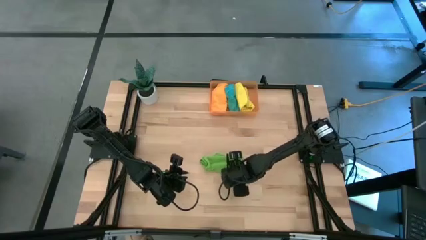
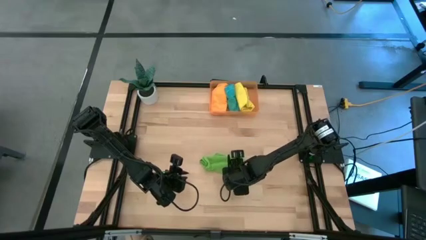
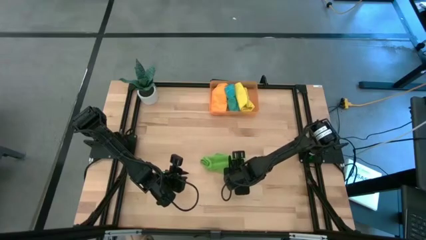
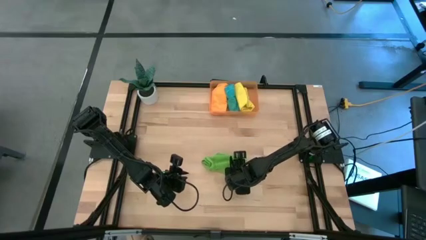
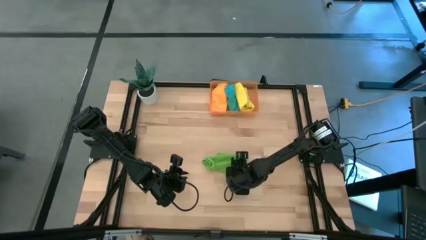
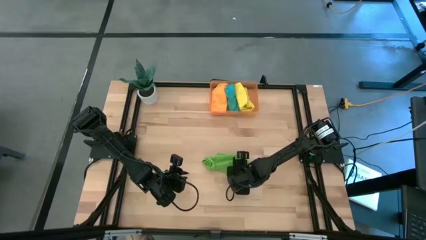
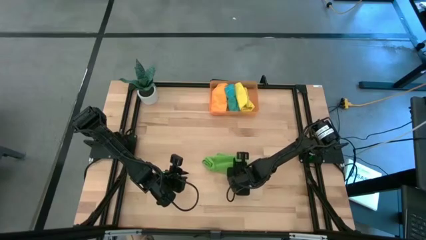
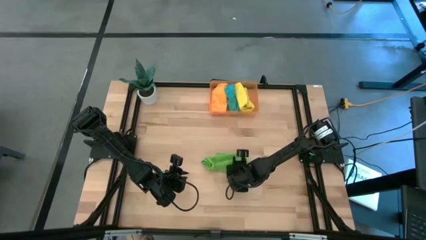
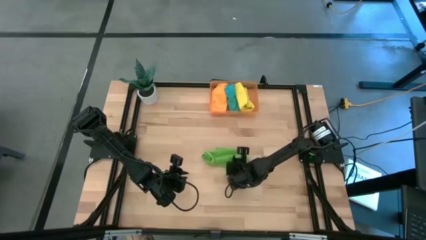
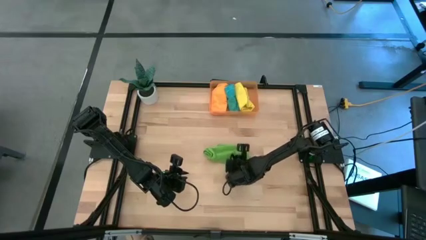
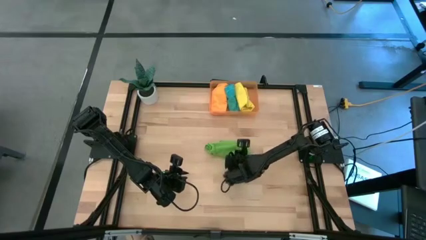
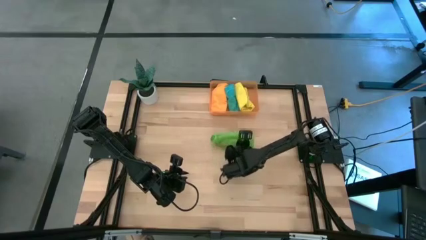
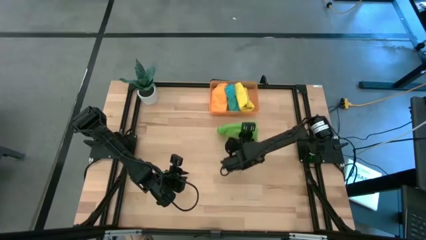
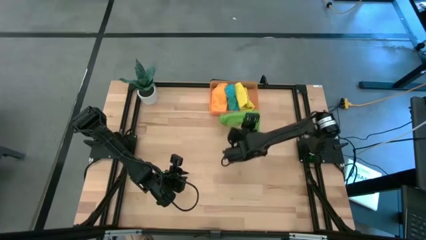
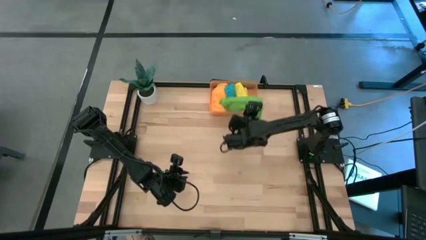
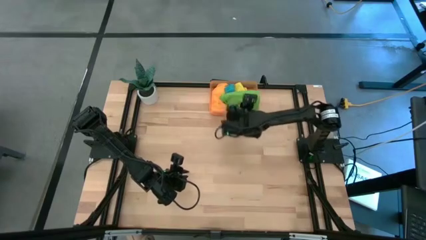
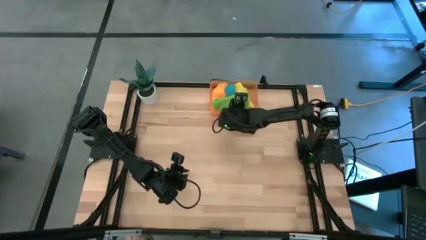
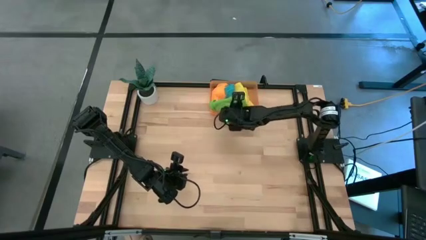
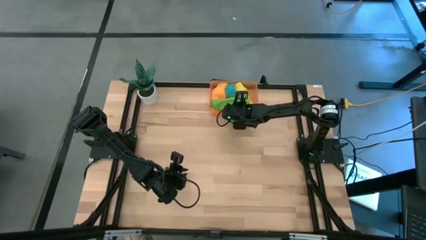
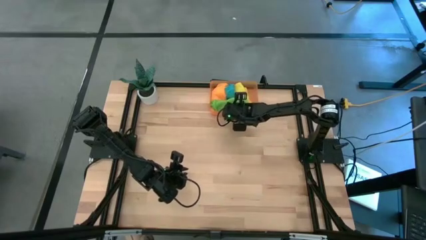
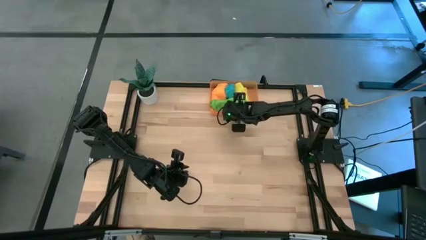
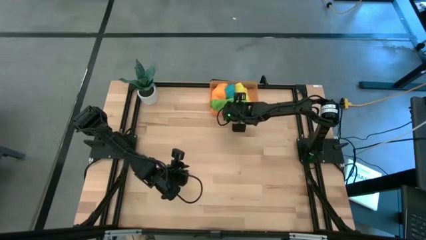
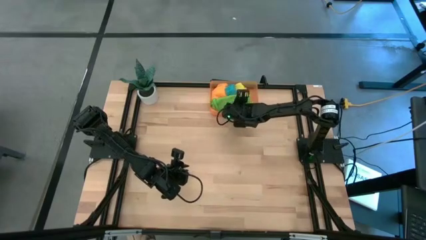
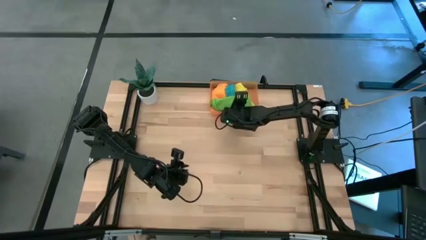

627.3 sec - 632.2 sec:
Task: Roll microfiber towels into tight, uniform cylinder then place into a basket
Put the green microfiber towel into the bin

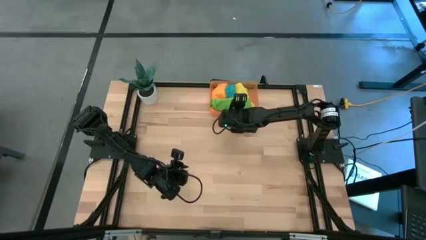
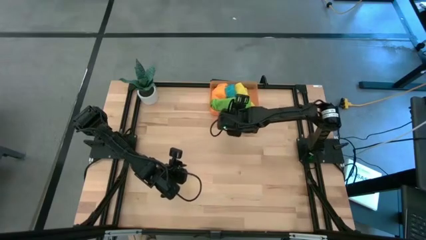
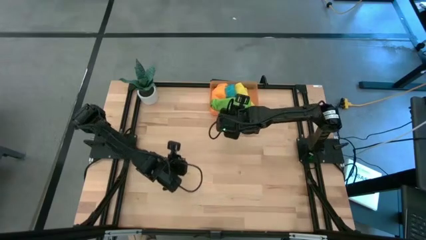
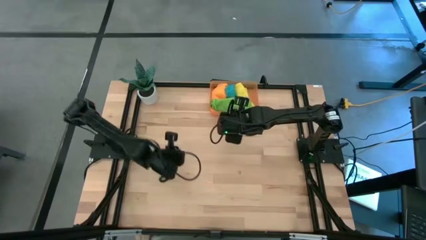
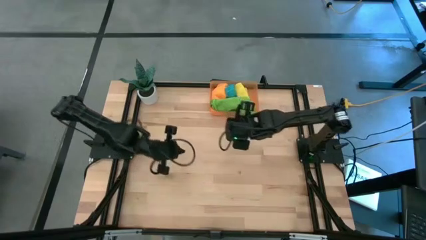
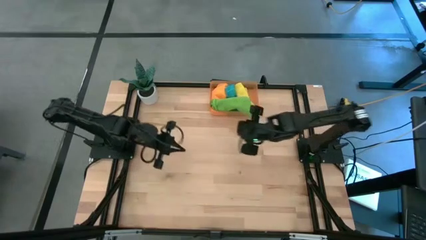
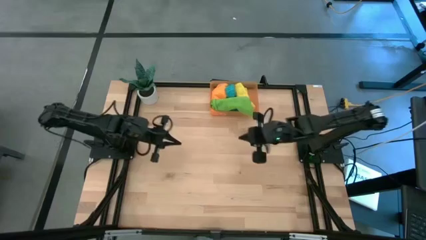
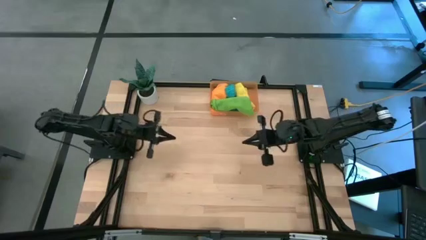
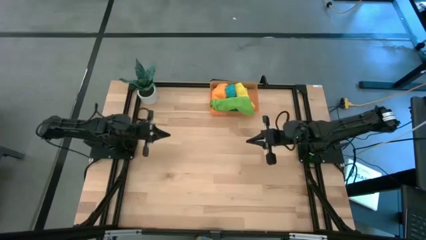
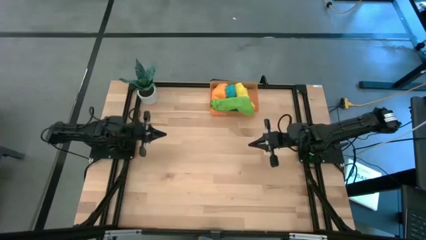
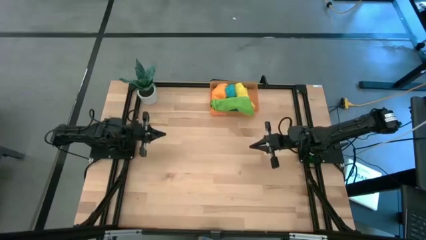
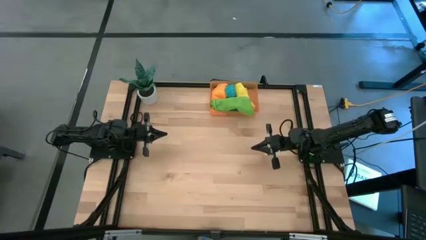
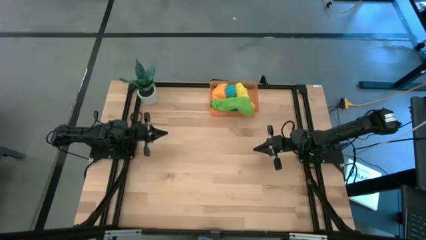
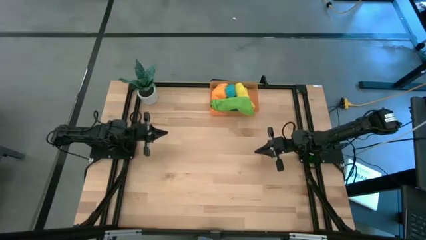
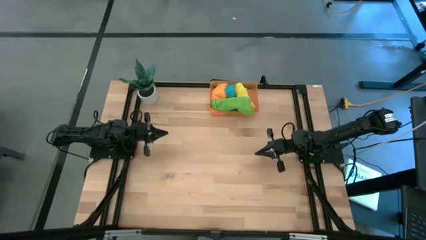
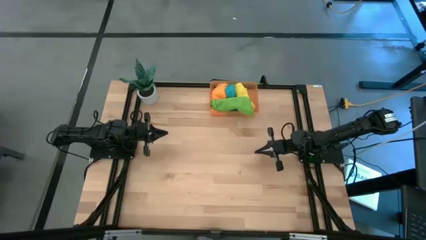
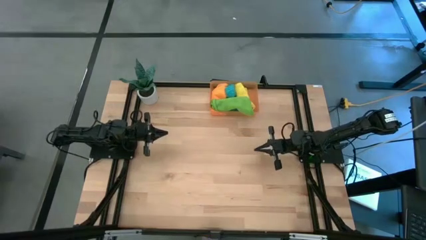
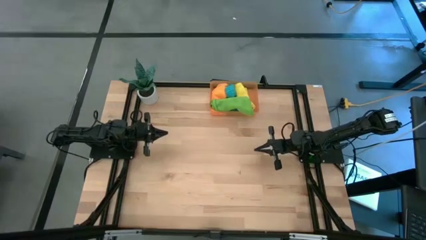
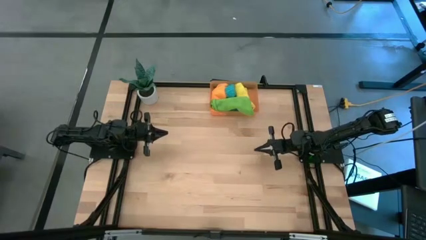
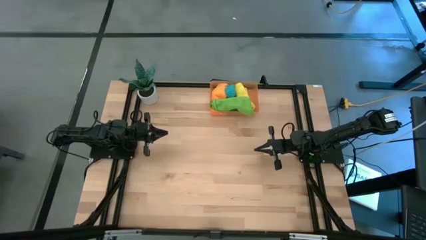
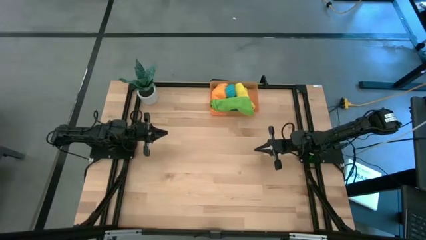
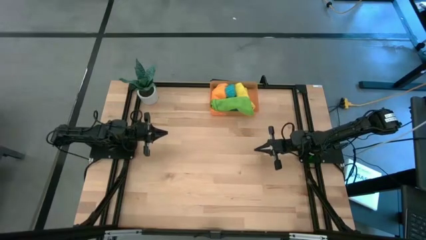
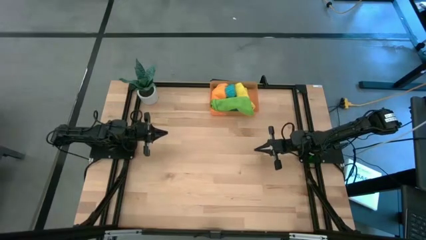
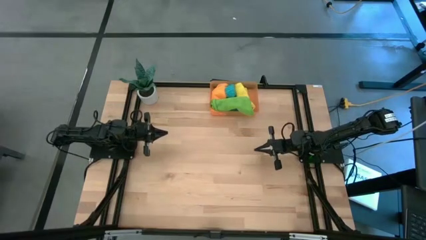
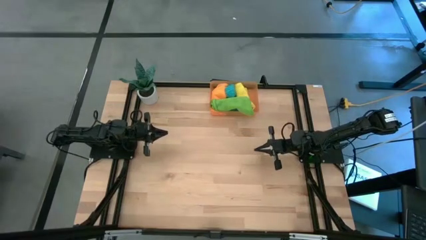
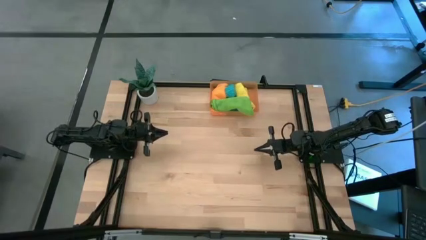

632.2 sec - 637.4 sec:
Return to home position

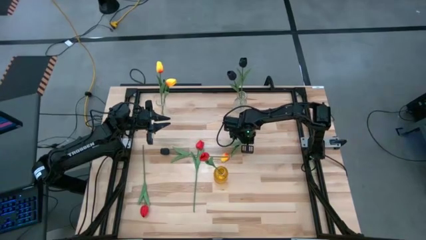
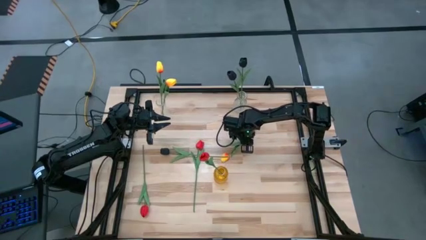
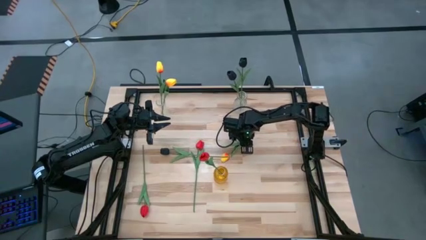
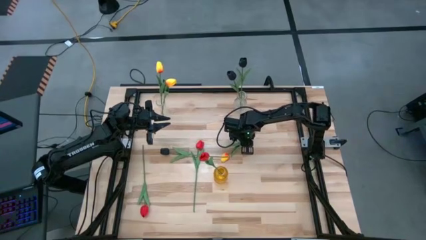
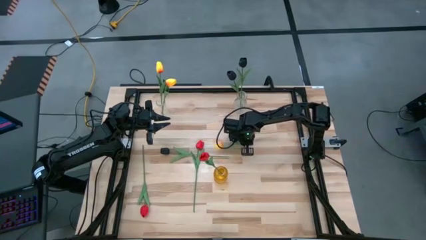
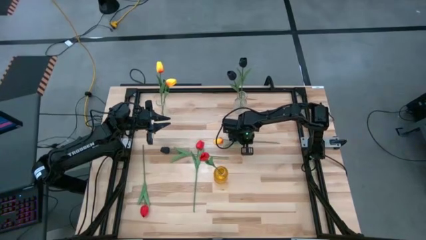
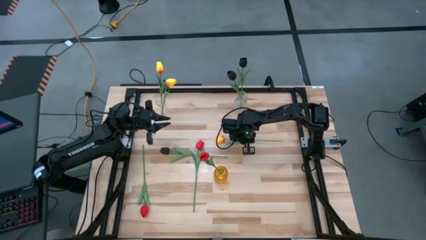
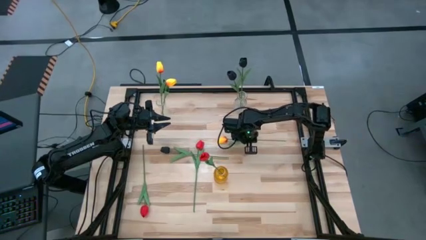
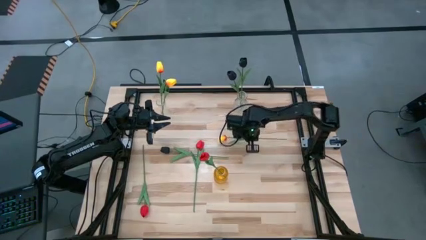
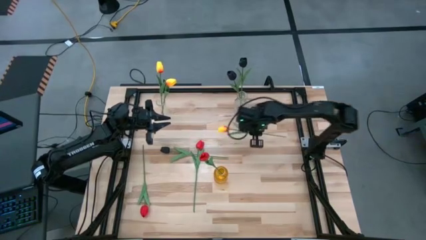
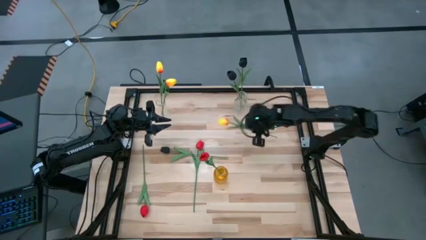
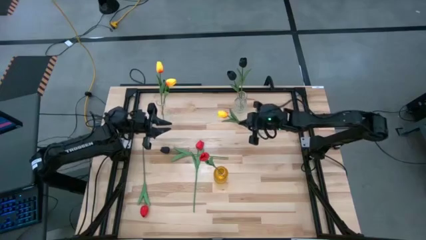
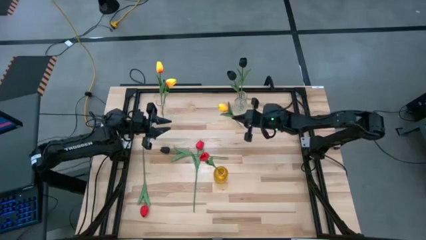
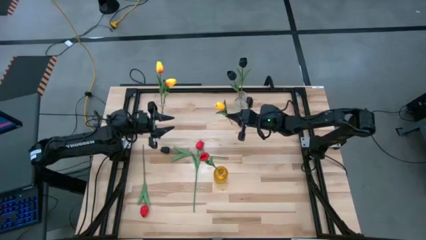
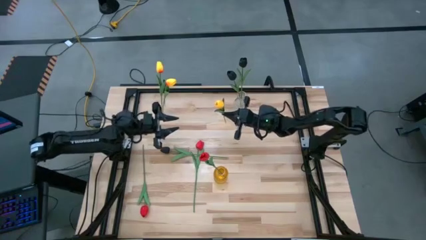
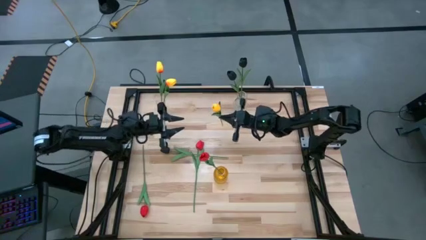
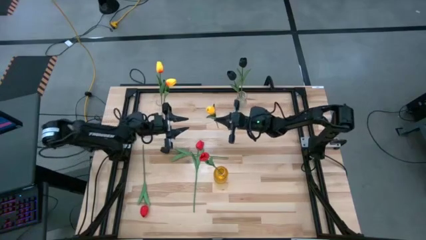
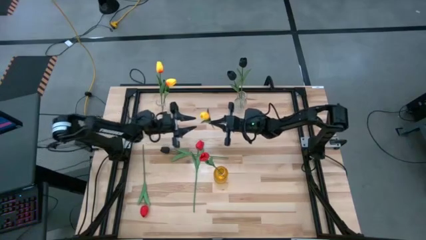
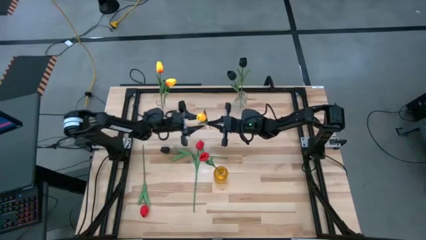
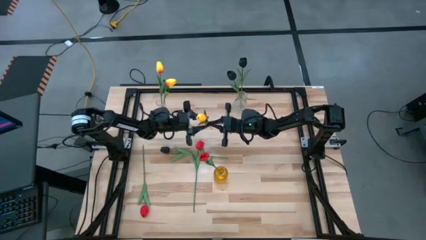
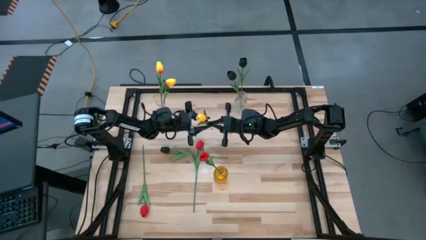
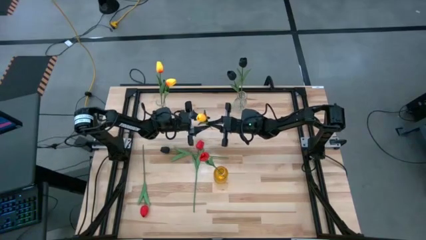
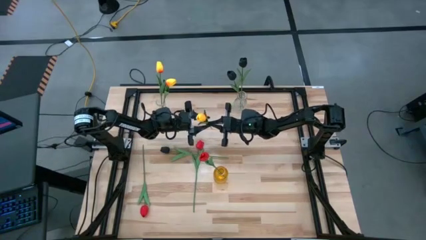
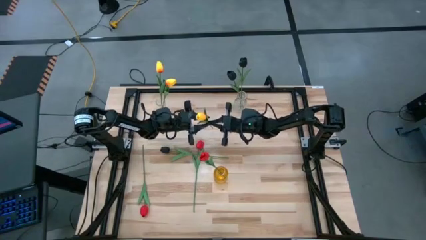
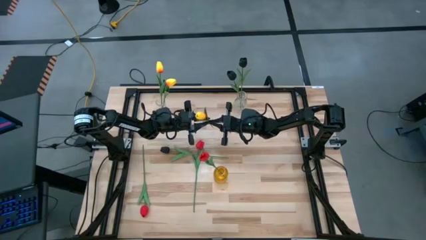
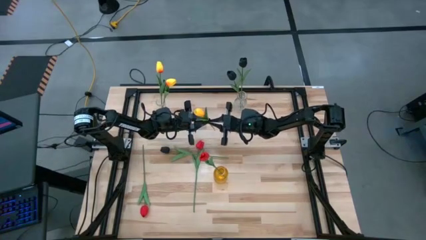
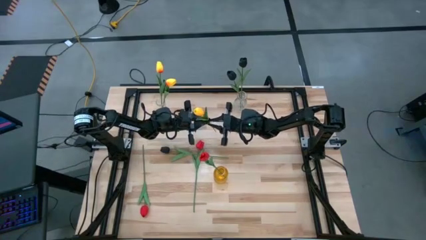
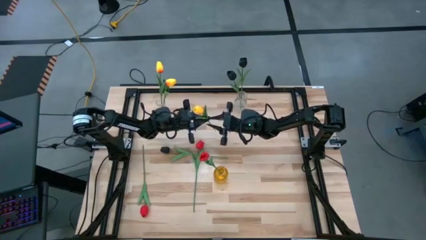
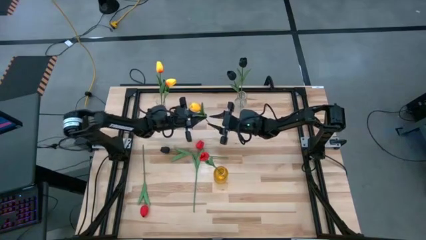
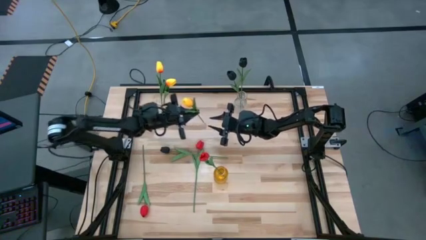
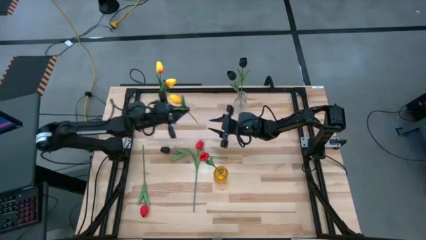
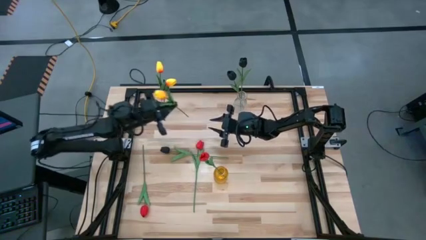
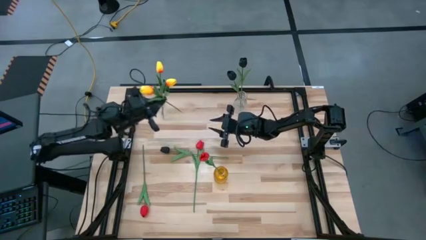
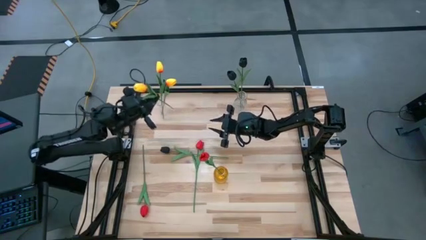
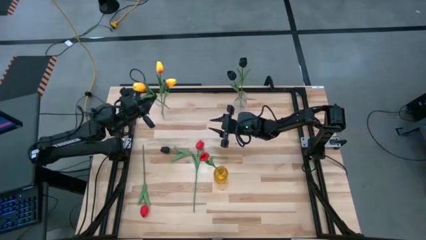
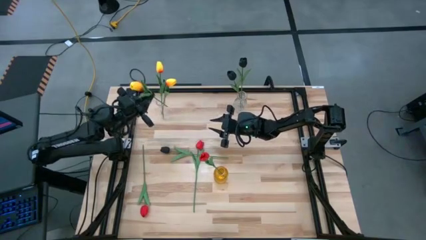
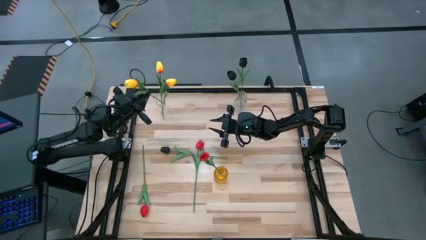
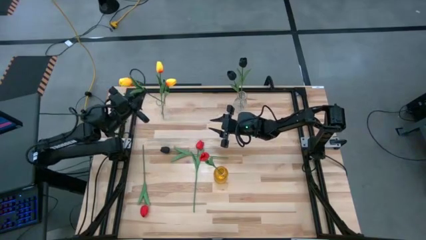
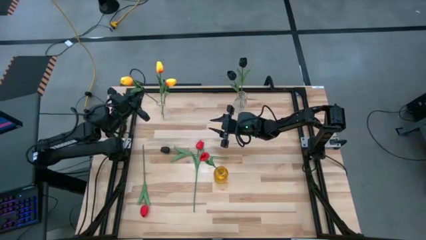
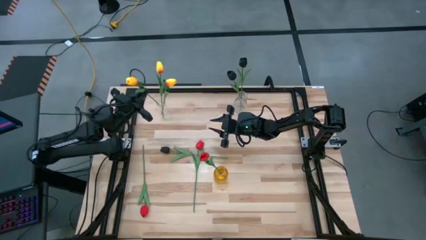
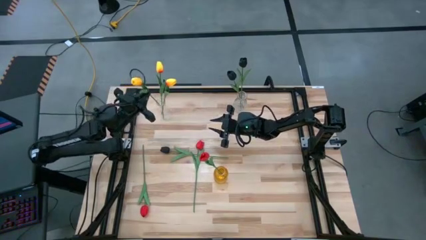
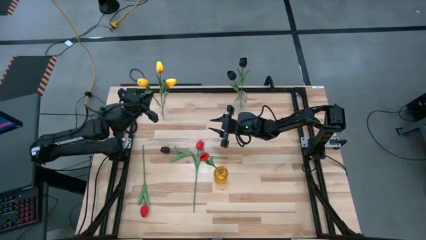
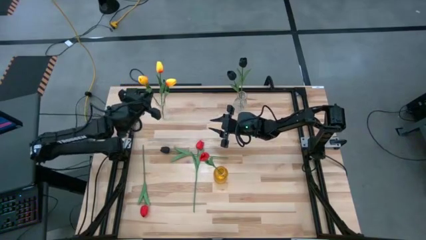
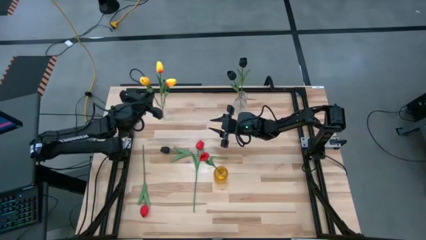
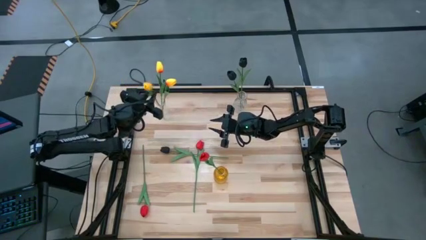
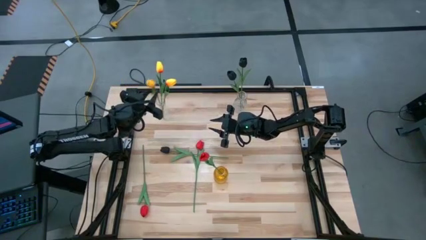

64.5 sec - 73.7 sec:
Task: Sort flowers into vase by color
Put the yellow flower into the left transparent vase
